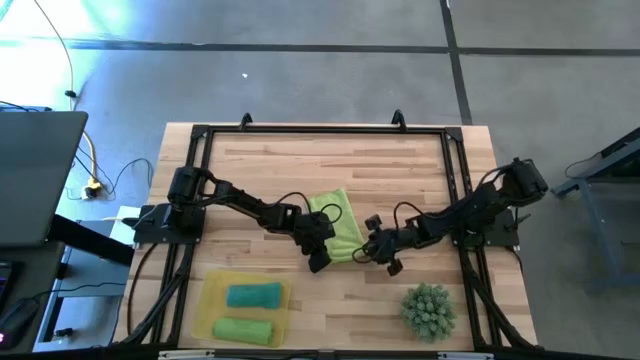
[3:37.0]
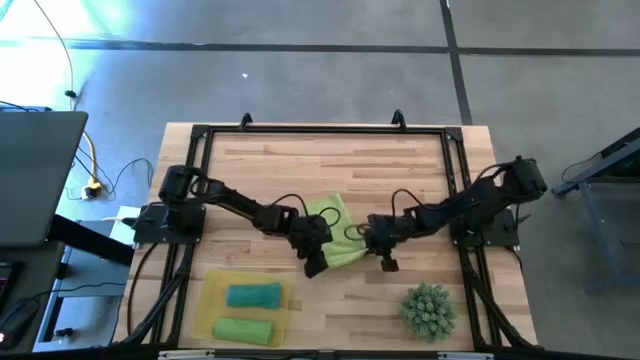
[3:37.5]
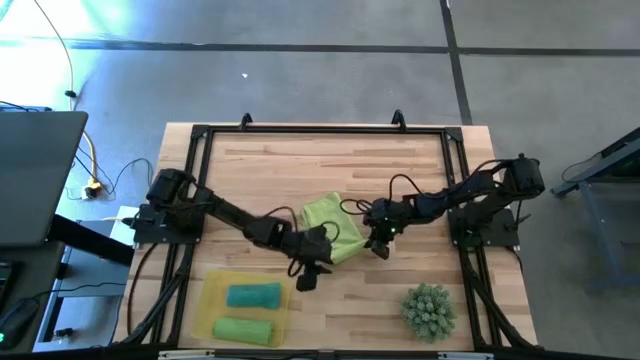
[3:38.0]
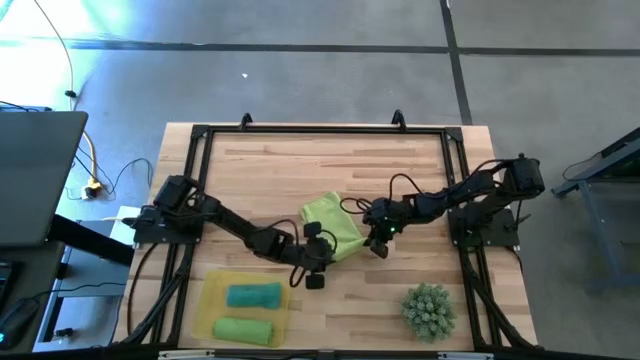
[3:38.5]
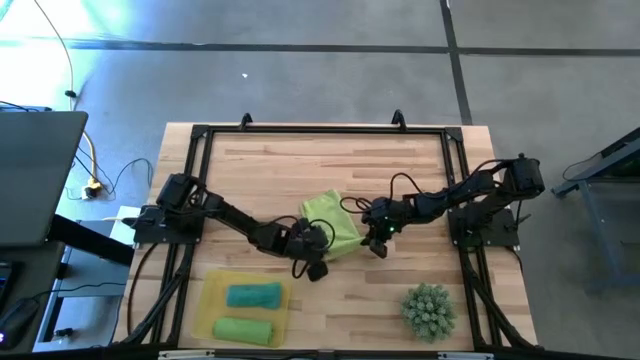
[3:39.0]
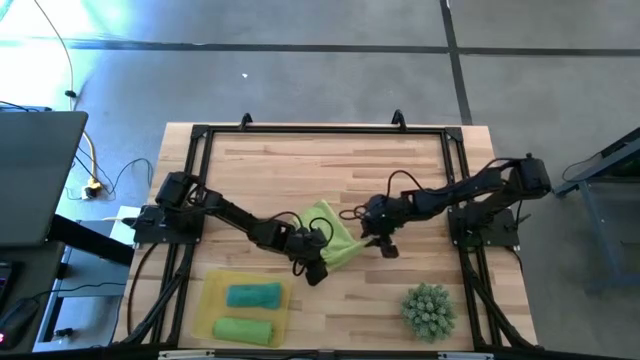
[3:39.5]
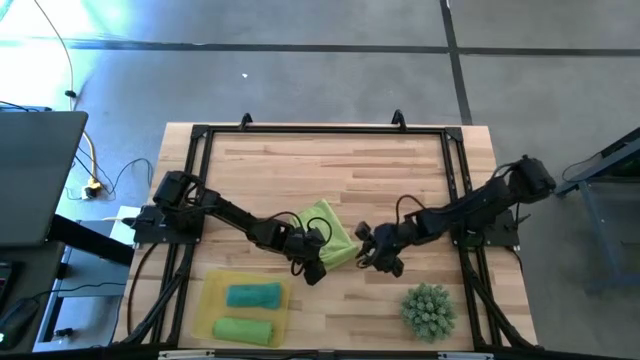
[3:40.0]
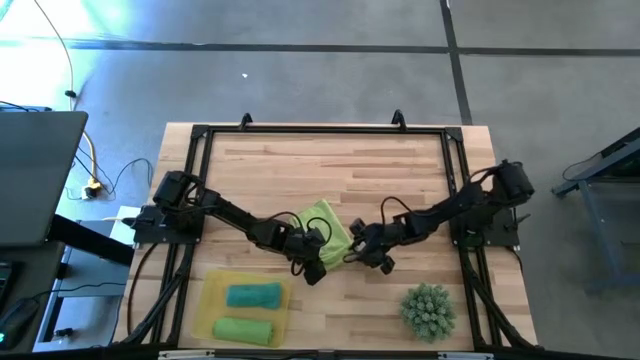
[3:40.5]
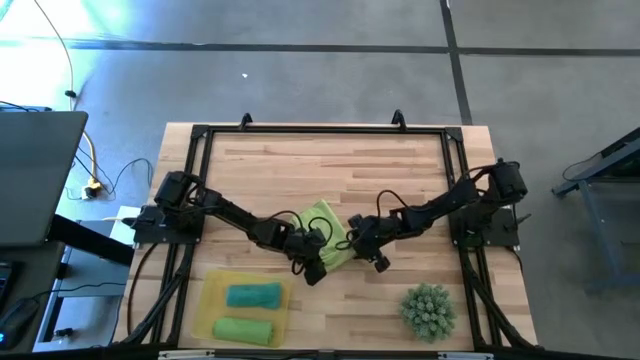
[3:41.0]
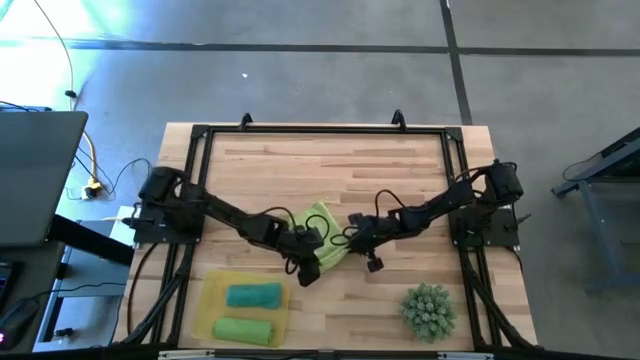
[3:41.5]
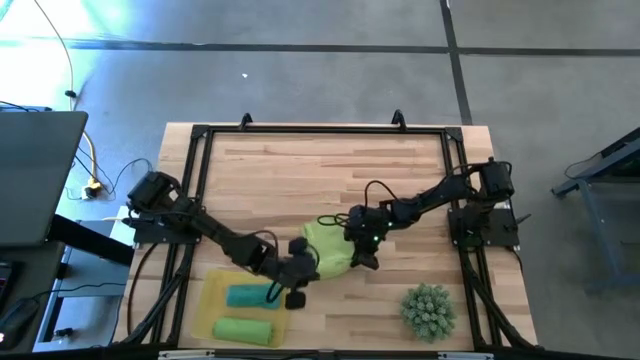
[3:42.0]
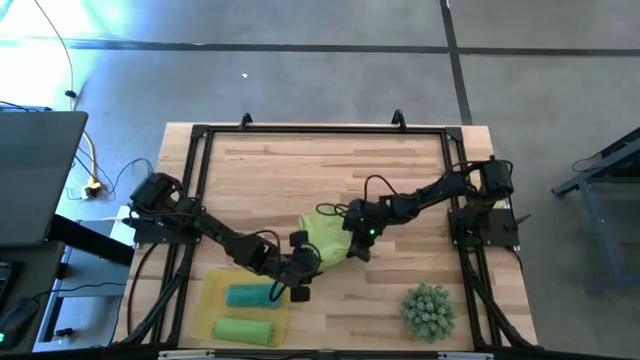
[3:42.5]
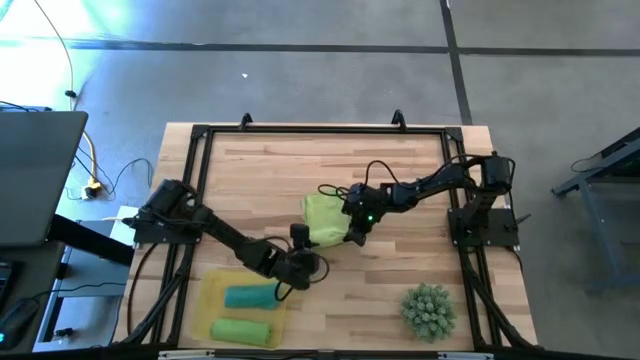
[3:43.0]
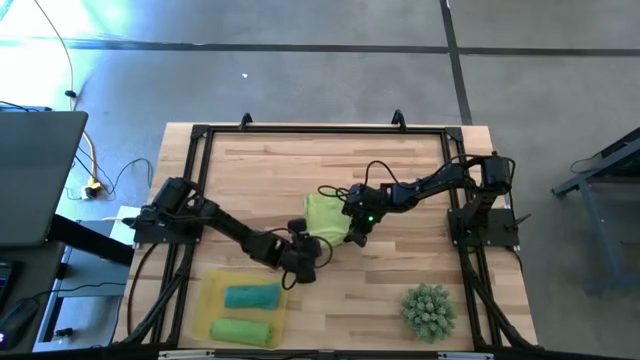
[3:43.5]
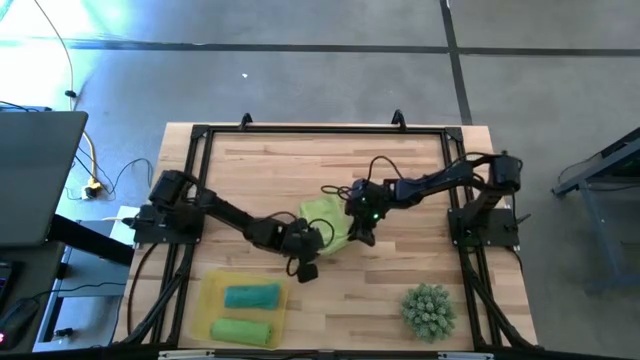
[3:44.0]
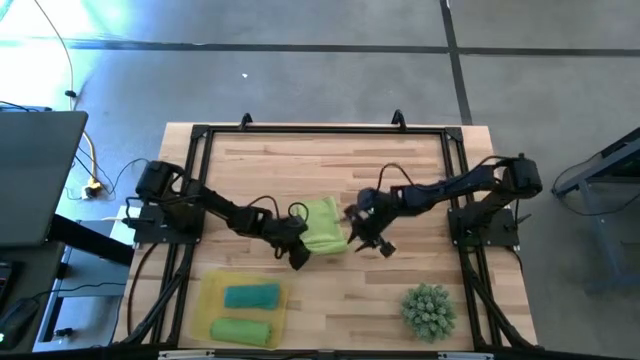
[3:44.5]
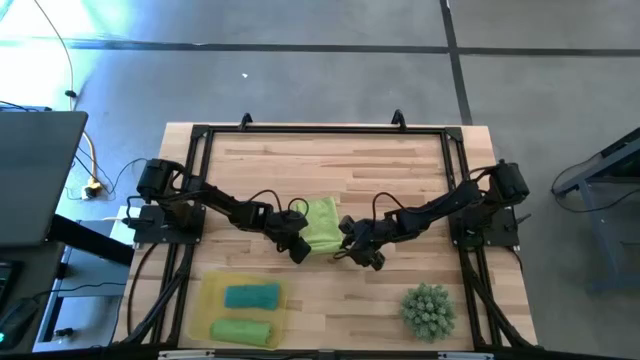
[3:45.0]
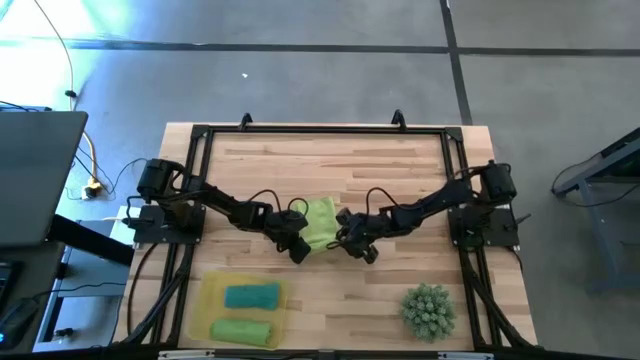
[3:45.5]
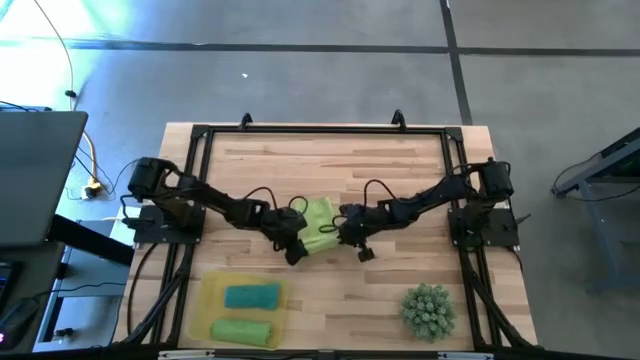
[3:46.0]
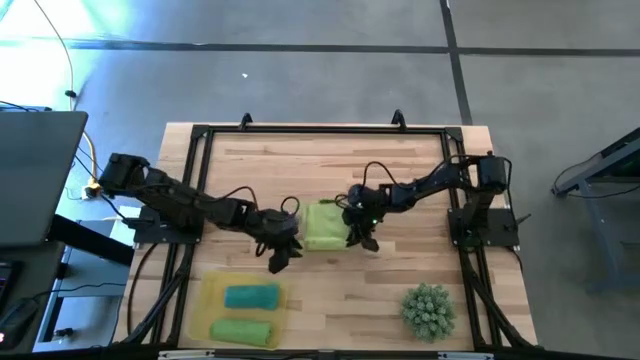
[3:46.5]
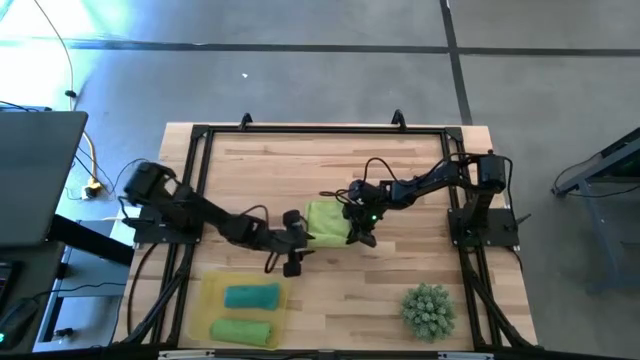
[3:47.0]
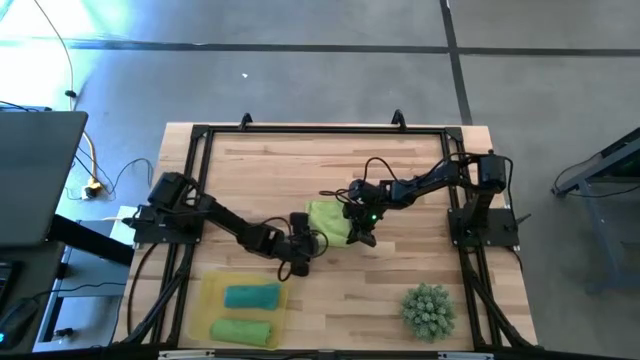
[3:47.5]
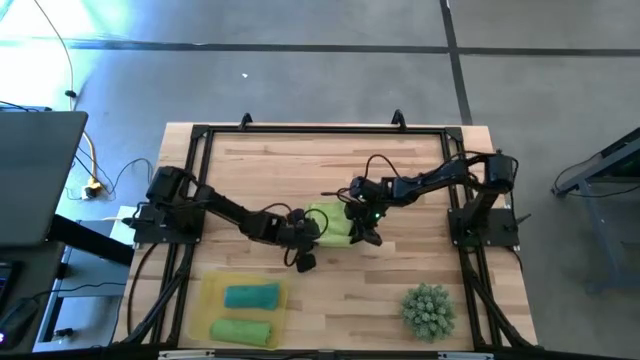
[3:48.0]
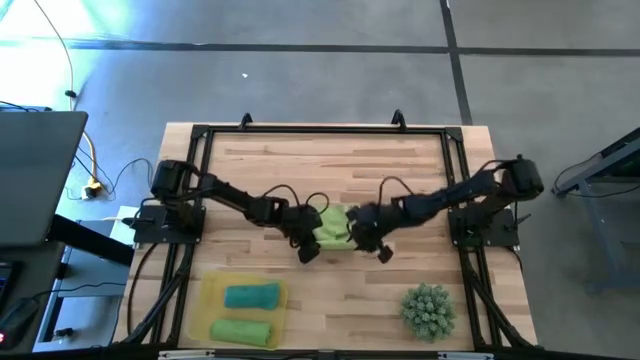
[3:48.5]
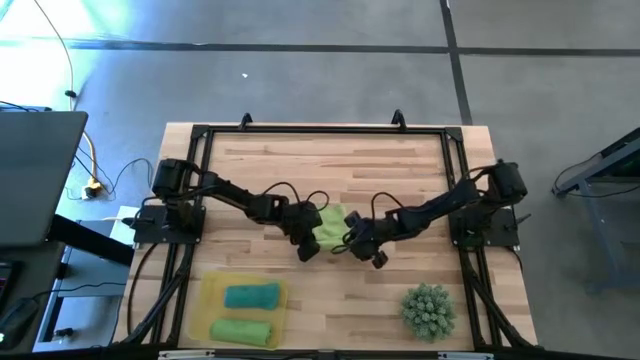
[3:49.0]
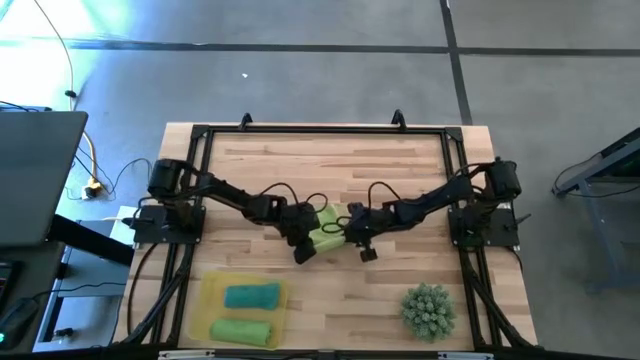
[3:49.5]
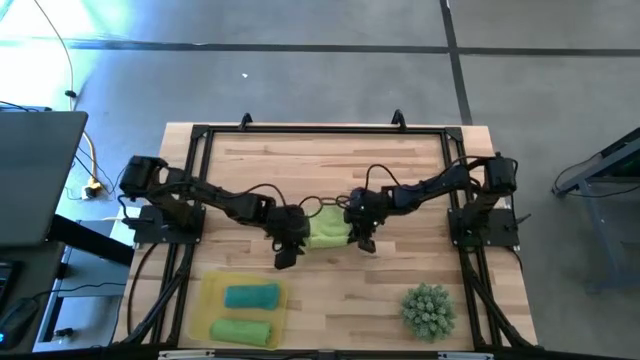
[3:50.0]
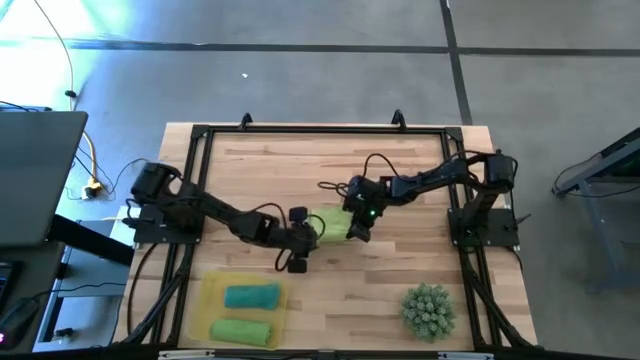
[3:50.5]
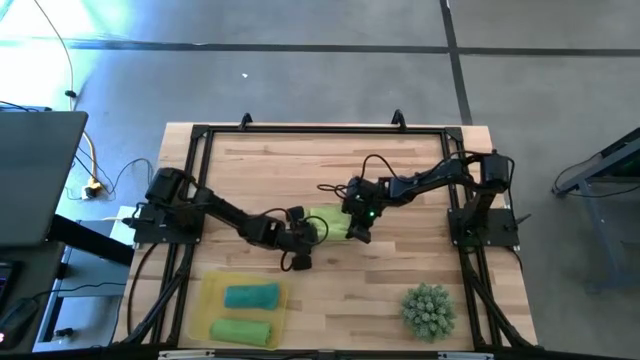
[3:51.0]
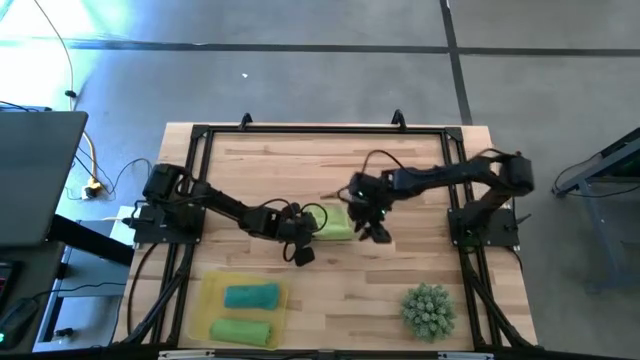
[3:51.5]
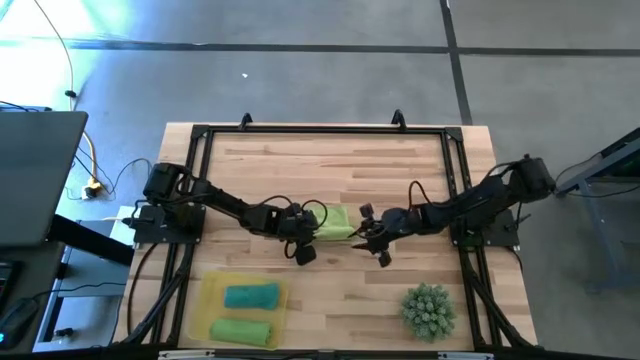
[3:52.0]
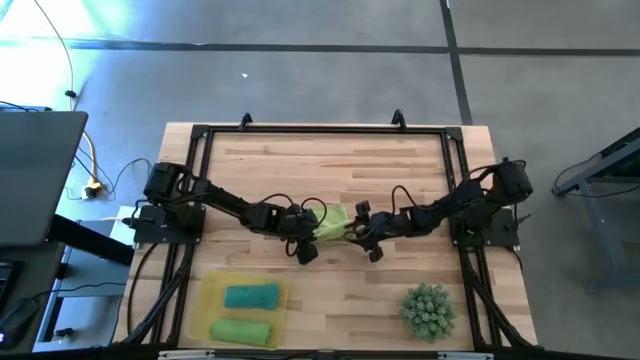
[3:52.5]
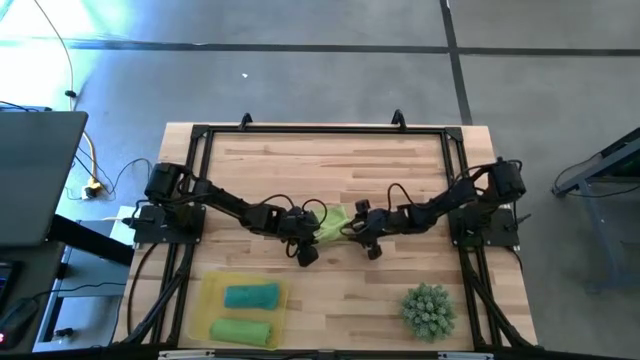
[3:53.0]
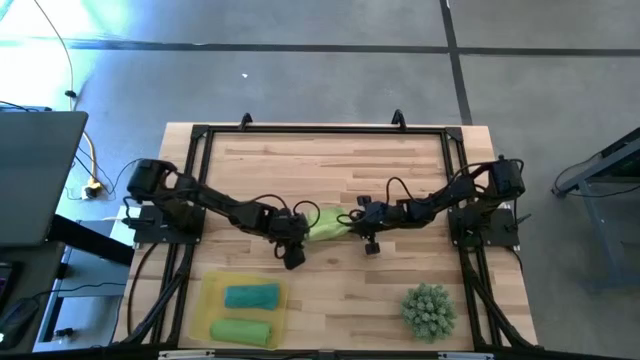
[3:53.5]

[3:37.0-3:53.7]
Task: Roll microfiber towels into tight, uniform cylinder then place into a basket
Roll the light green microfiber towel
